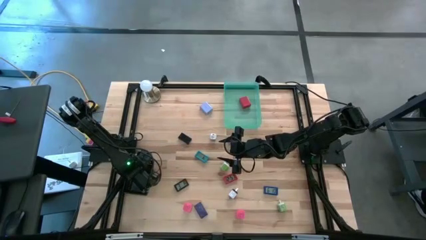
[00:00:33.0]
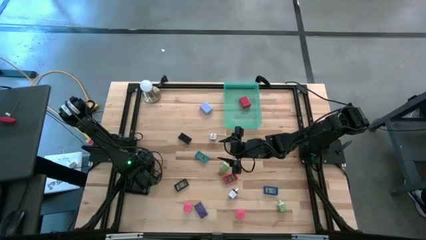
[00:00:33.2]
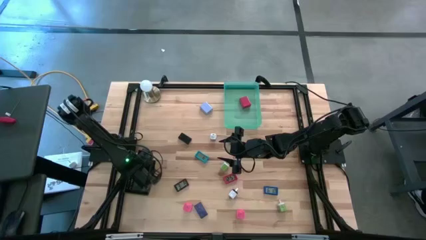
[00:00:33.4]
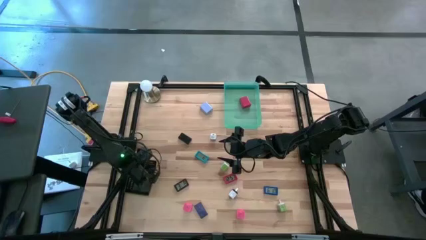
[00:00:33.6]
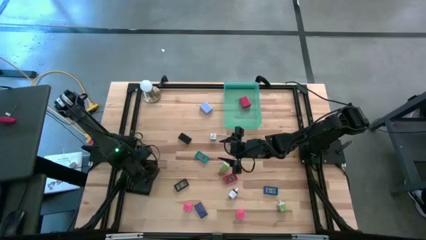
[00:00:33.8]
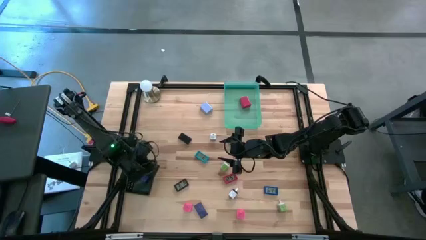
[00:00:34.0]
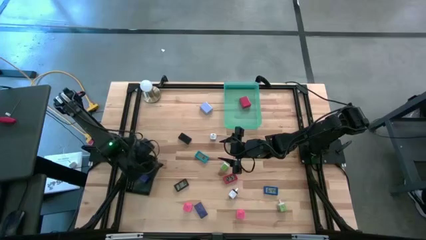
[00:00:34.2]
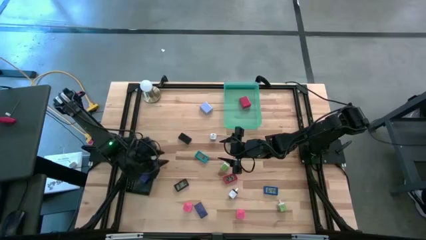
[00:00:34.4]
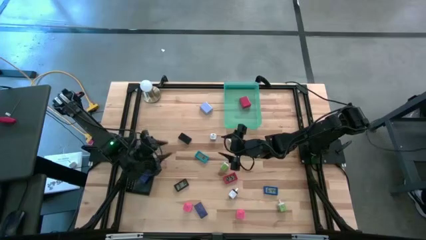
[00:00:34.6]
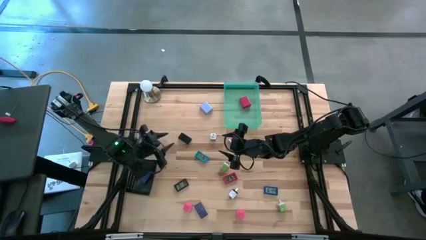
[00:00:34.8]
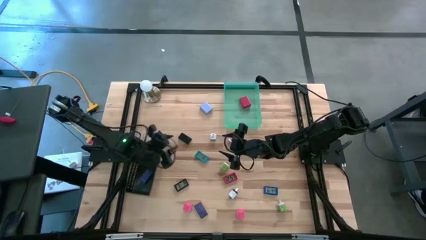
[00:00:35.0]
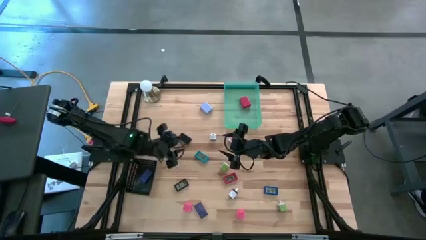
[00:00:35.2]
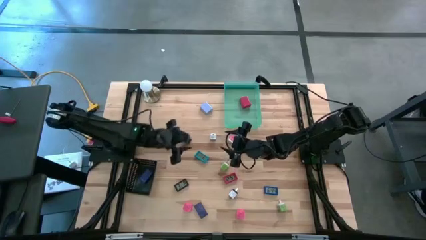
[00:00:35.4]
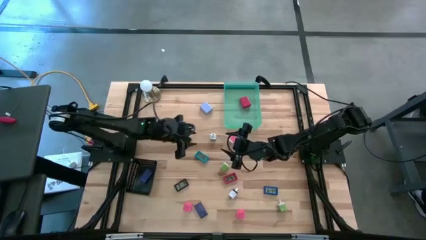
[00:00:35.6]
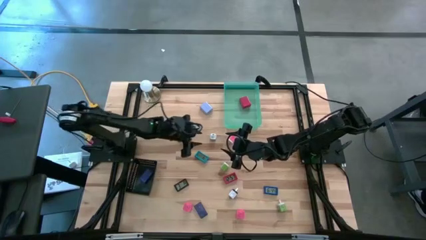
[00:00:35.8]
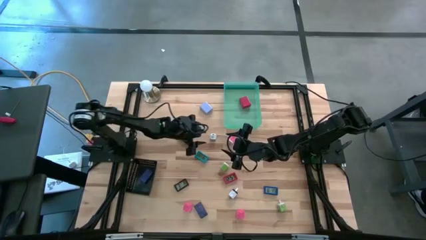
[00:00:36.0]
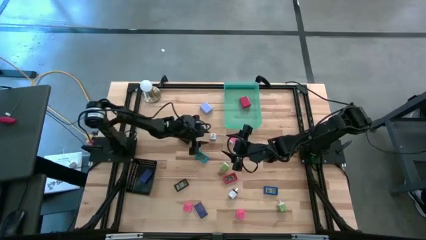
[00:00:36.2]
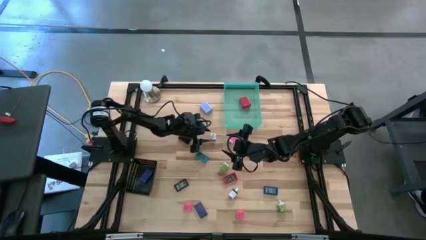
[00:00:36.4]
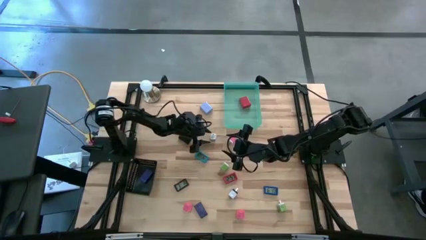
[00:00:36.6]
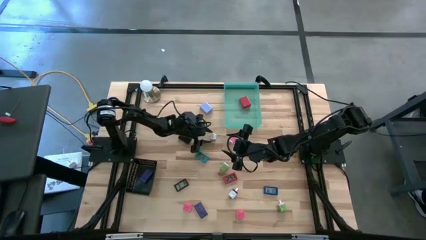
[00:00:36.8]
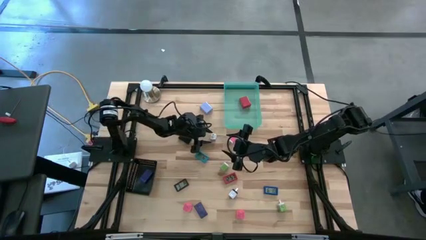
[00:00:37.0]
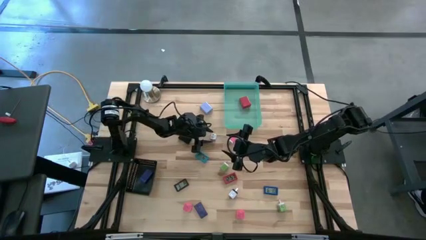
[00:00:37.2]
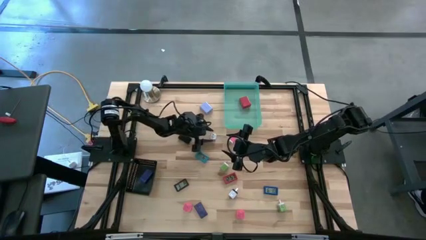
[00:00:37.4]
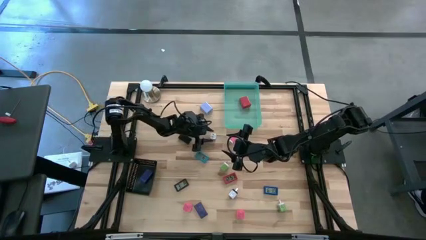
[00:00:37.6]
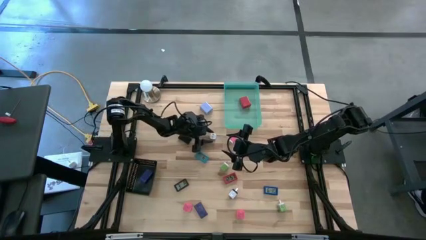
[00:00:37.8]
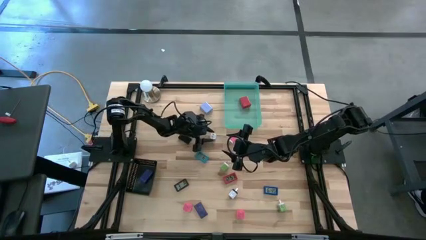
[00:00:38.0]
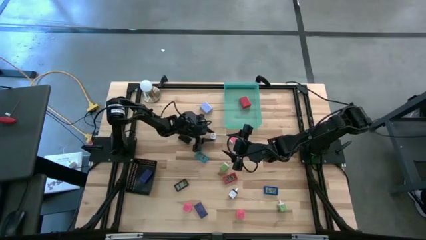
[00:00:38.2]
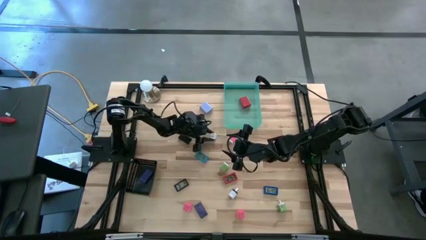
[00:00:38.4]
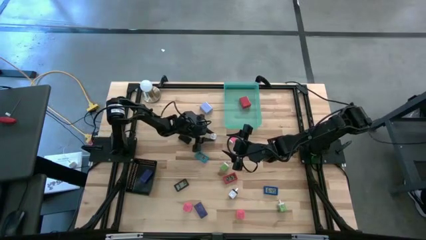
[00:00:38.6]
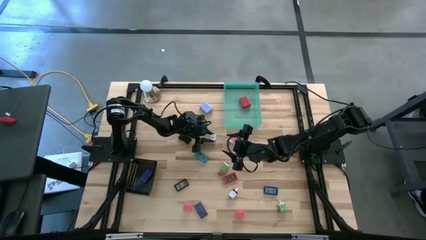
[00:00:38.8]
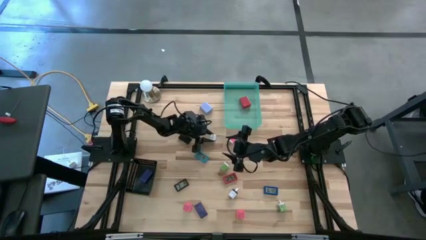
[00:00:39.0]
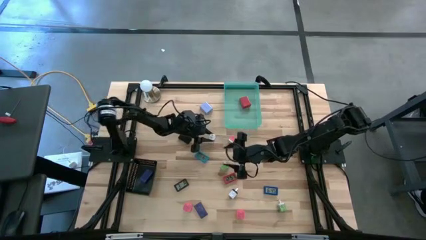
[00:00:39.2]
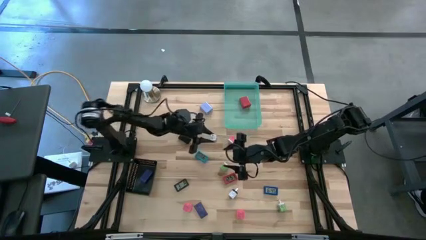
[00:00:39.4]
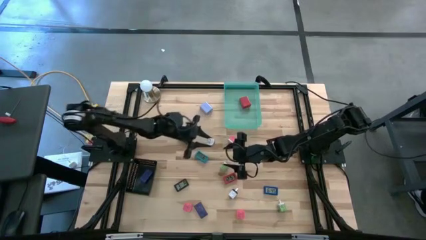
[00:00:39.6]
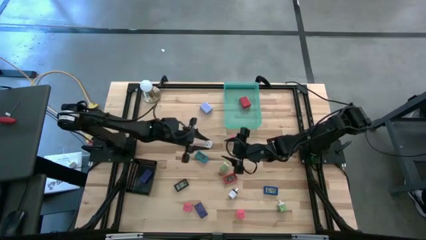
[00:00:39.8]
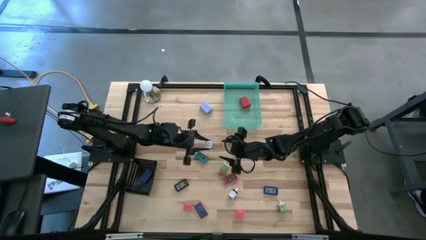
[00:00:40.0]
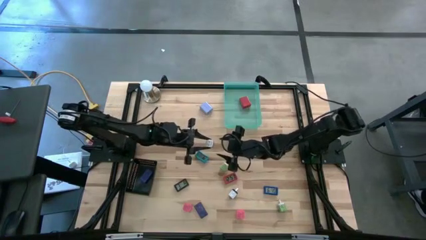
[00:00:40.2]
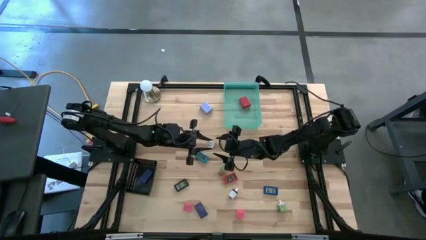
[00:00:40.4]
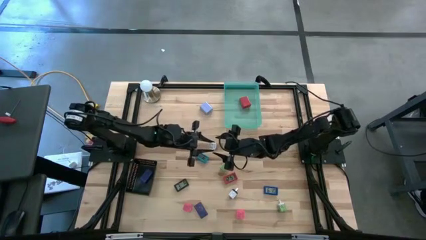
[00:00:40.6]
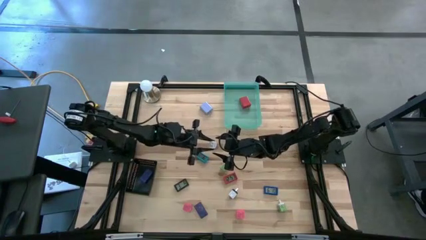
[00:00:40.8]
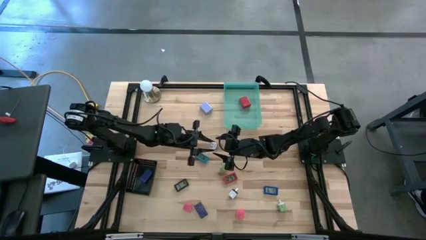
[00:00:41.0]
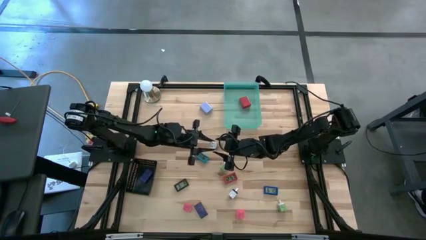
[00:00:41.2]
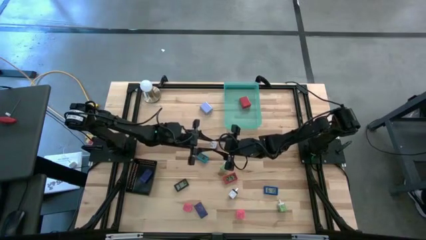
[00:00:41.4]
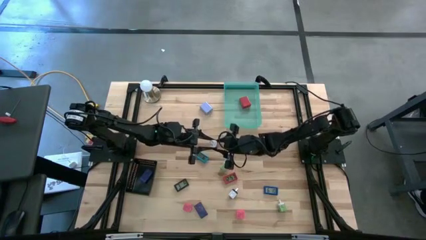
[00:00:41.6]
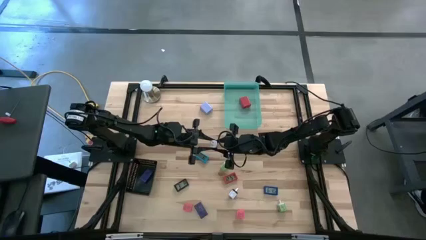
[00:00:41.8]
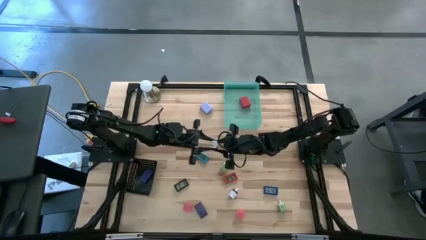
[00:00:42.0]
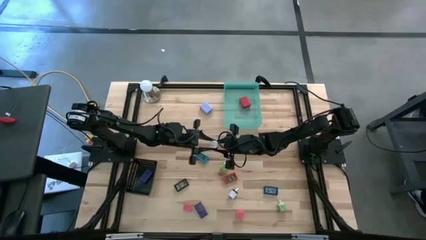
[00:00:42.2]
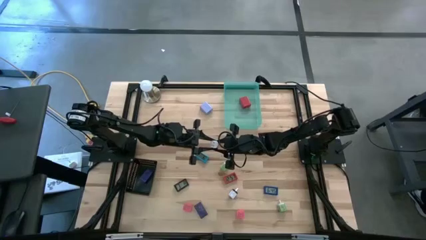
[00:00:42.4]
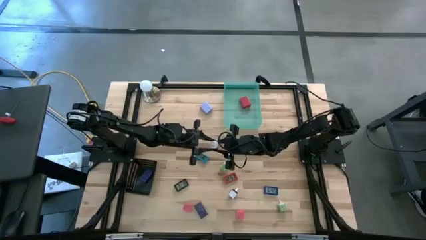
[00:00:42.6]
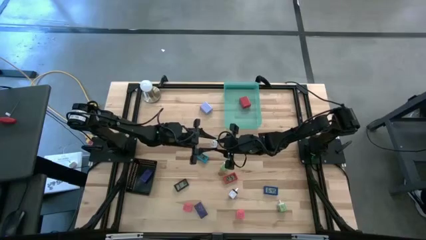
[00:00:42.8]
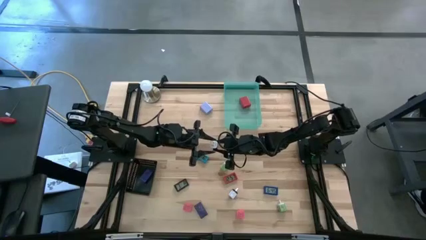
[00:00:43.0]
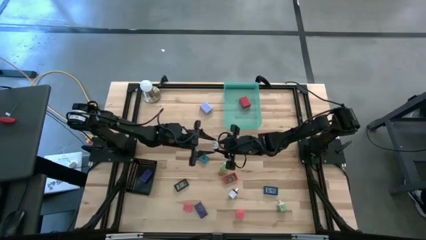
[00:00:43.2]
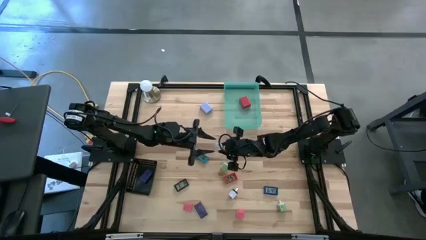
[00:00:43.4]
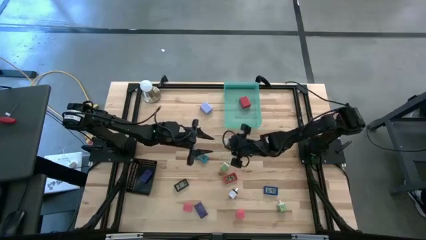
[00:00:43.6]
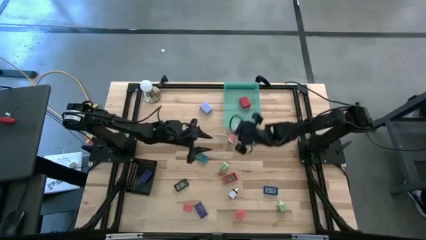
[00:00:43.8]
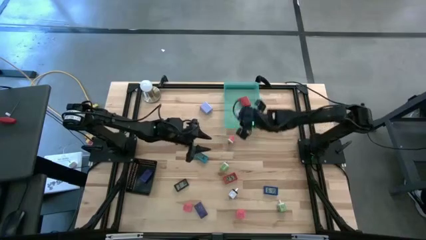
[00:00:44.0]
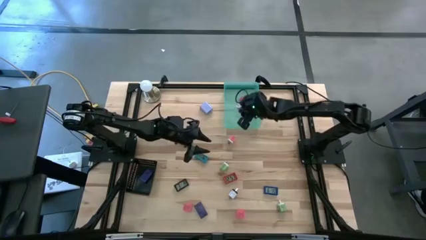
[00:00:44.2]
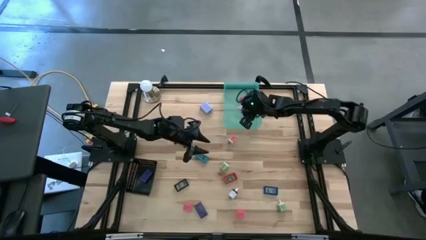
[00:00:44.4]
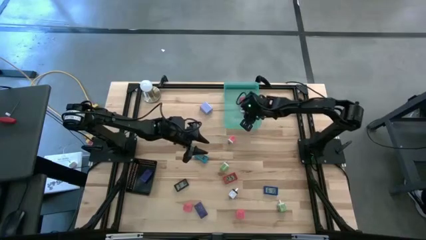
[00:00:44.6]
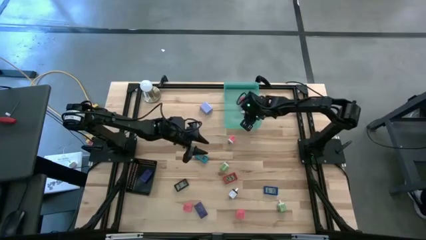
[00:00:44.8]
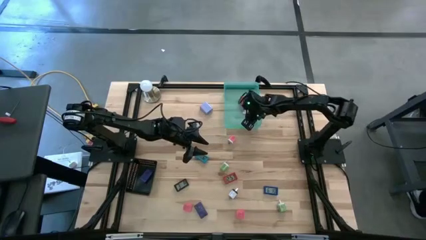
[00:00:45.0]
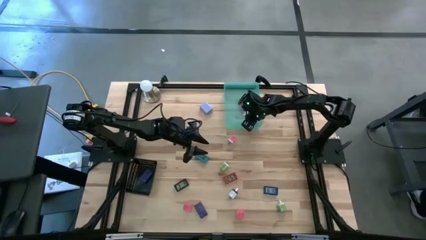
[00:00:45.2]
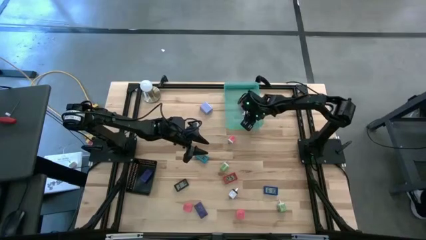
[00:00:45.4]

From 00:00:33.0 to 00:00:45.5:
Task: Pick & Place Office items
Put the purple white charger adapter into the green bin
